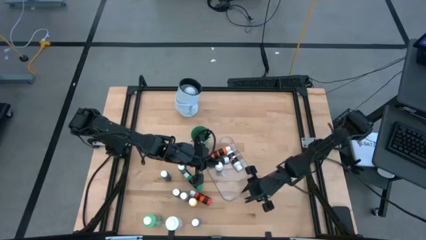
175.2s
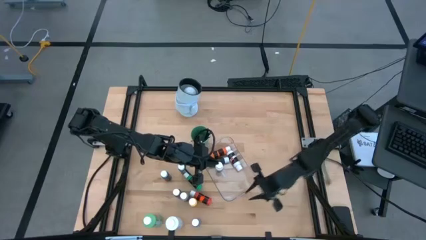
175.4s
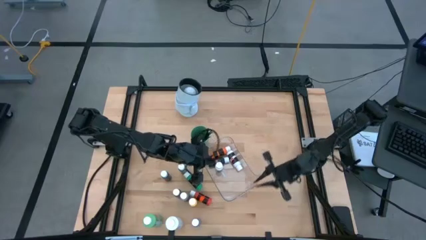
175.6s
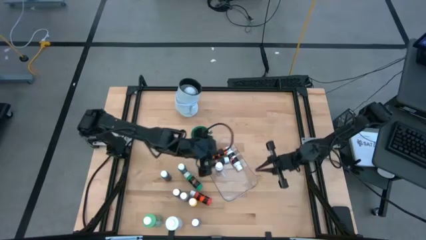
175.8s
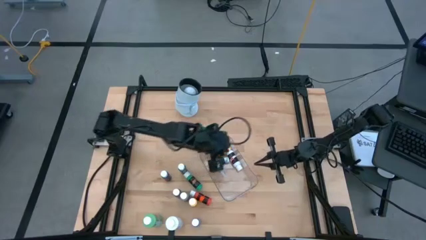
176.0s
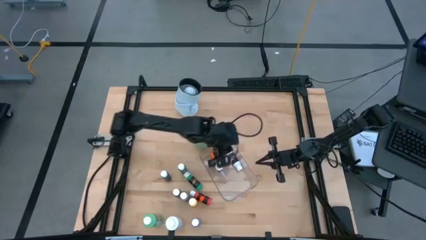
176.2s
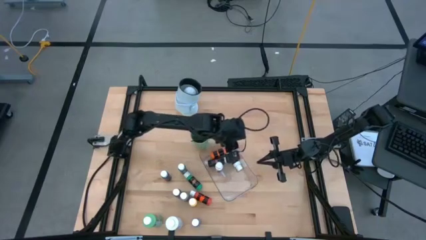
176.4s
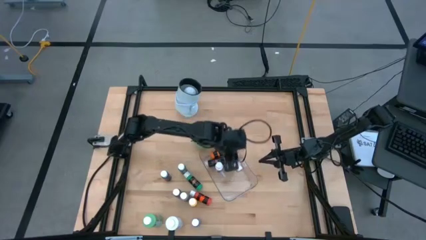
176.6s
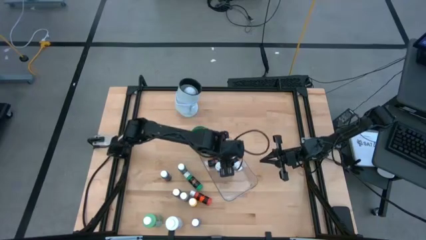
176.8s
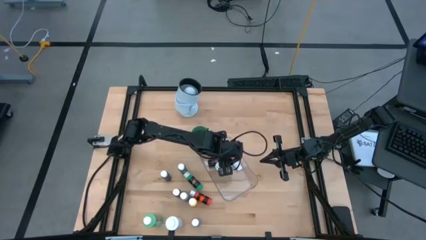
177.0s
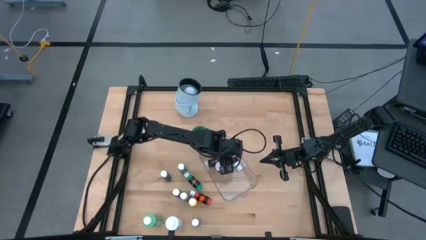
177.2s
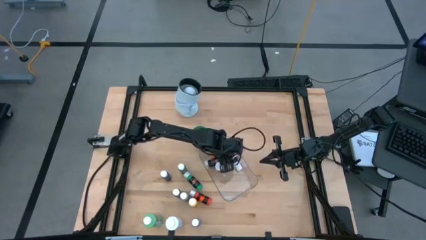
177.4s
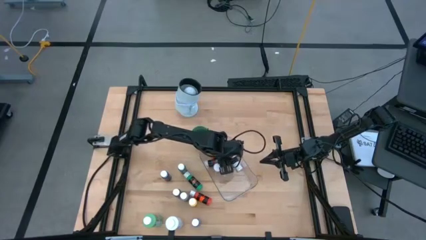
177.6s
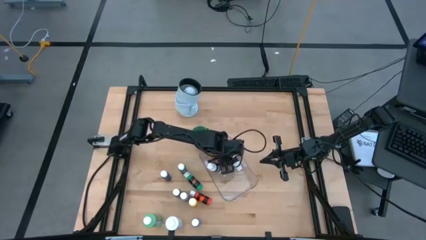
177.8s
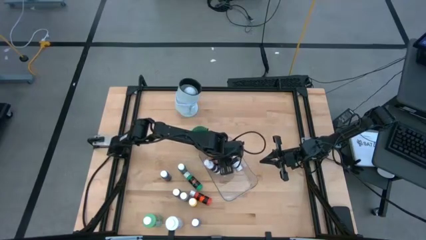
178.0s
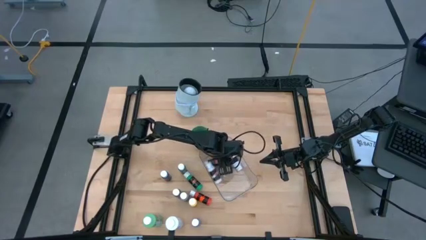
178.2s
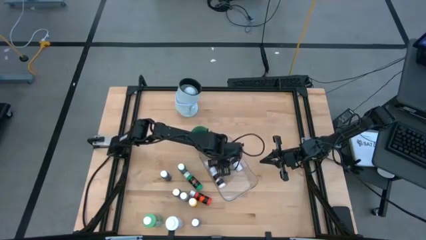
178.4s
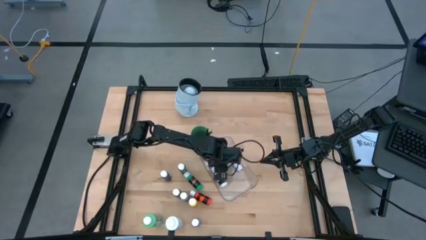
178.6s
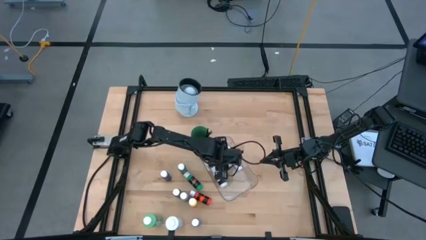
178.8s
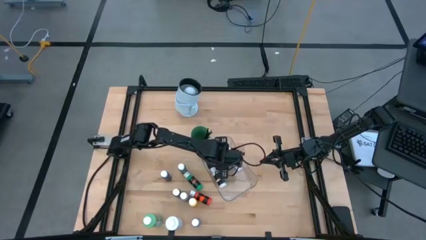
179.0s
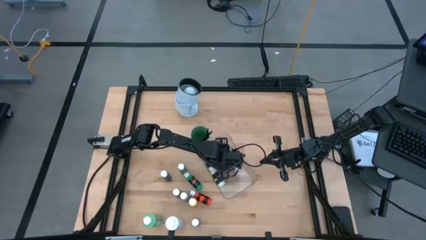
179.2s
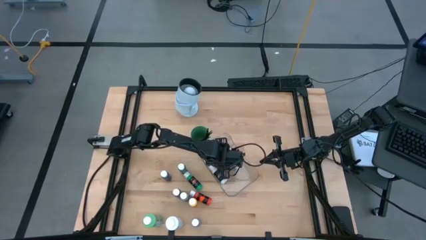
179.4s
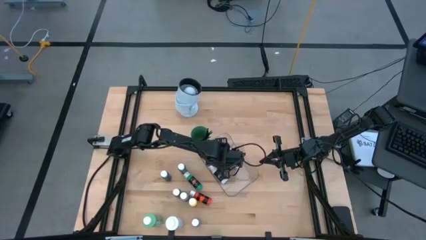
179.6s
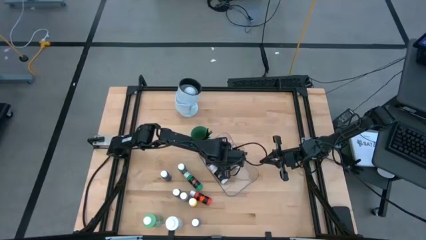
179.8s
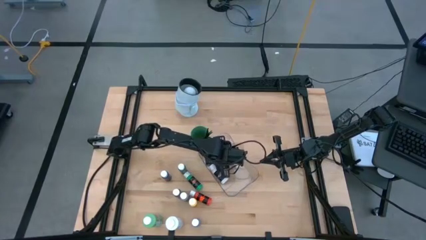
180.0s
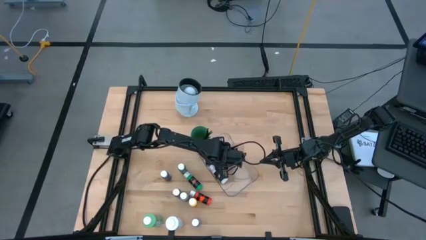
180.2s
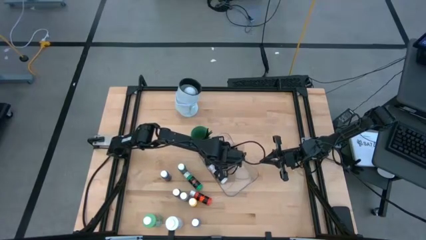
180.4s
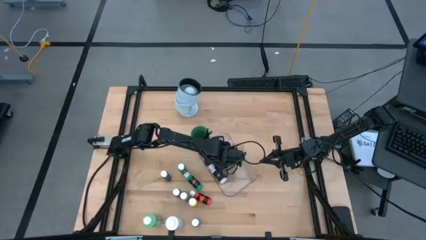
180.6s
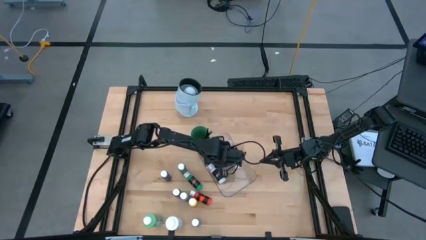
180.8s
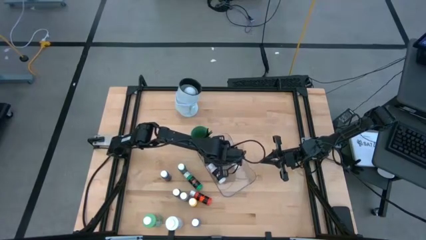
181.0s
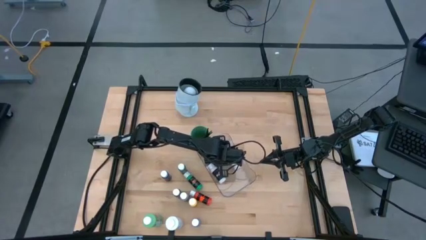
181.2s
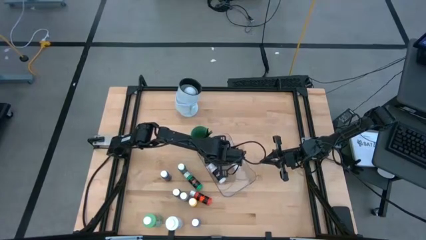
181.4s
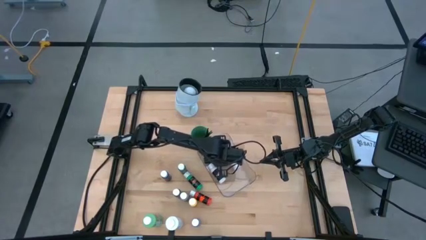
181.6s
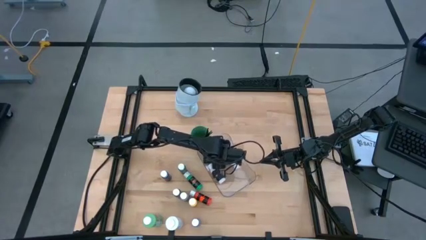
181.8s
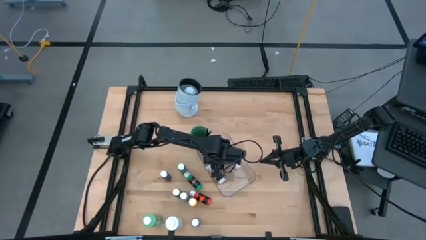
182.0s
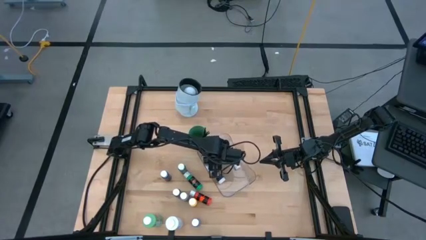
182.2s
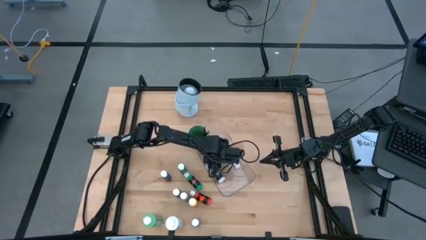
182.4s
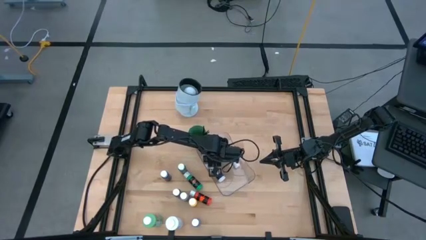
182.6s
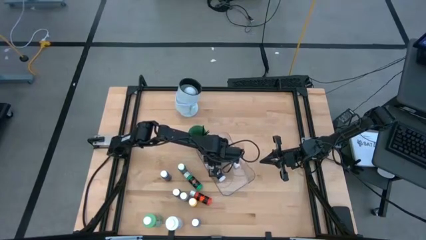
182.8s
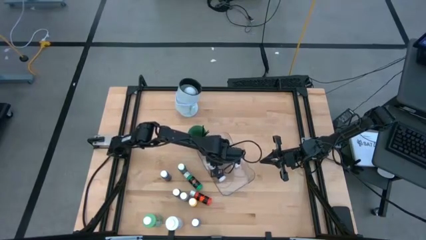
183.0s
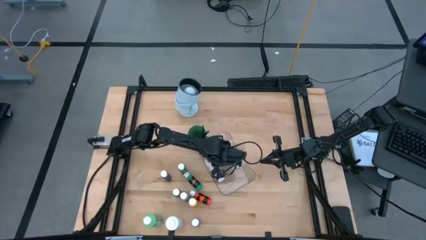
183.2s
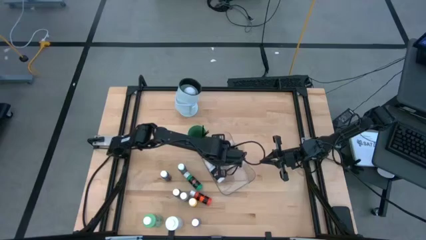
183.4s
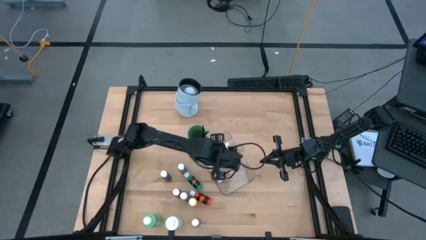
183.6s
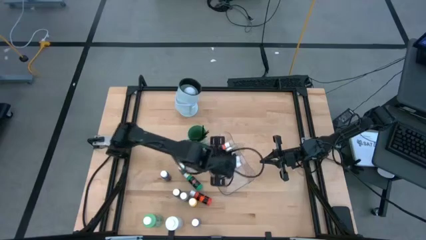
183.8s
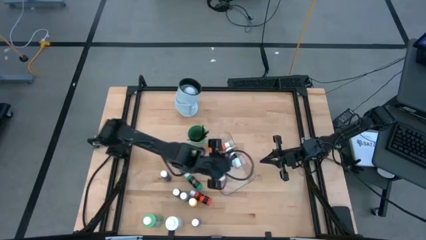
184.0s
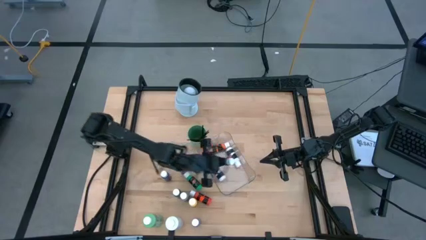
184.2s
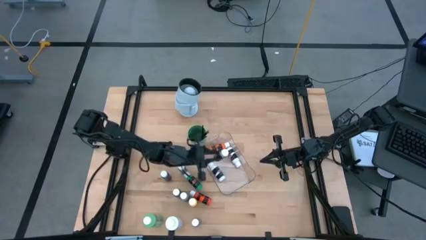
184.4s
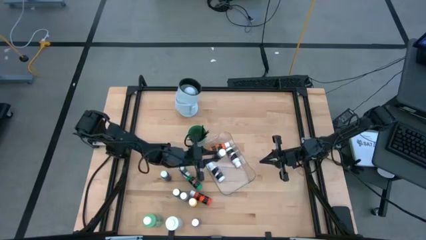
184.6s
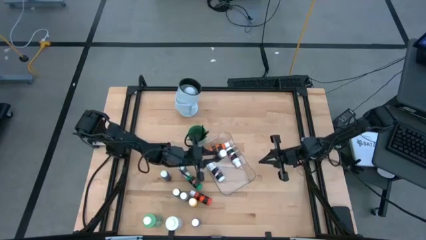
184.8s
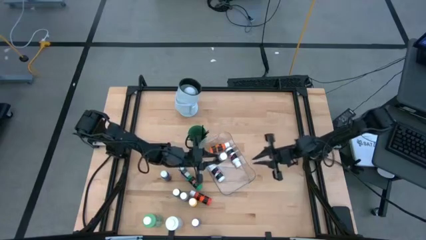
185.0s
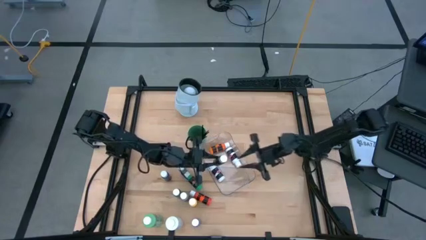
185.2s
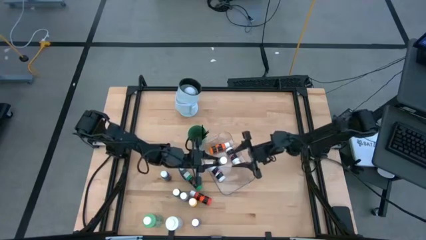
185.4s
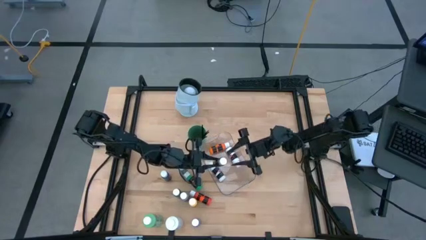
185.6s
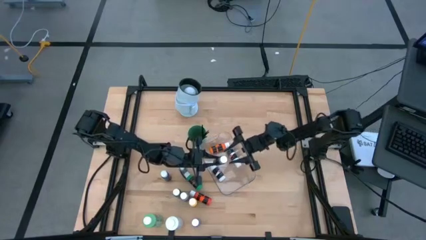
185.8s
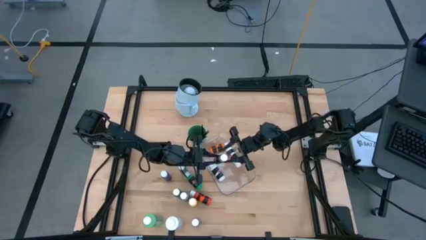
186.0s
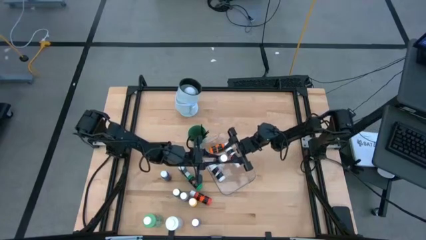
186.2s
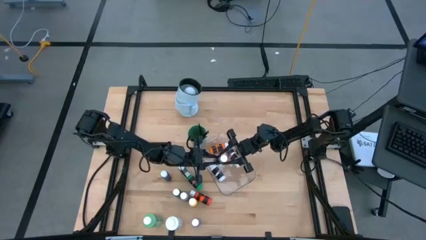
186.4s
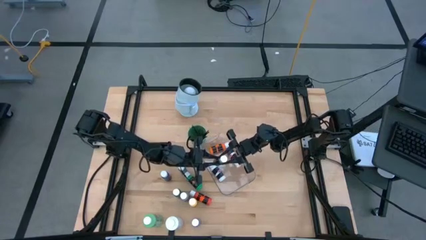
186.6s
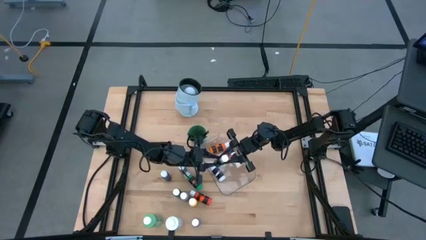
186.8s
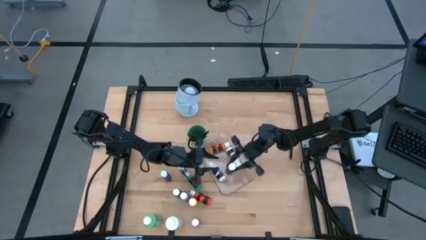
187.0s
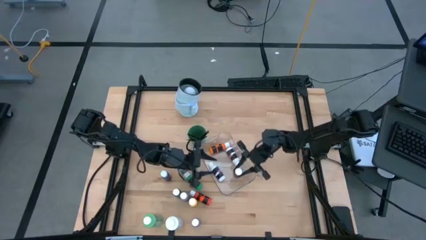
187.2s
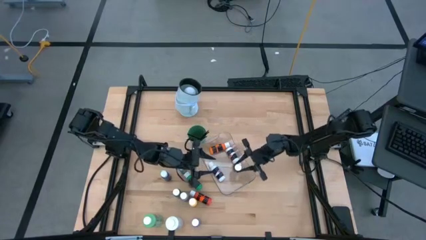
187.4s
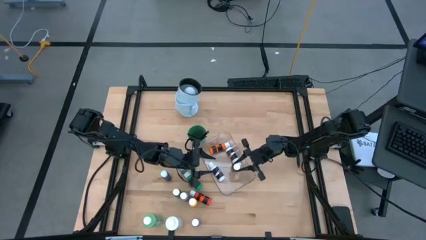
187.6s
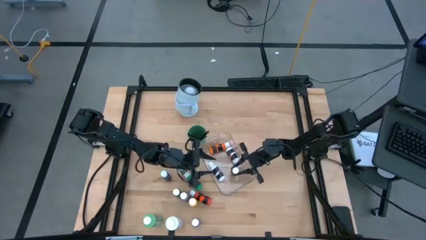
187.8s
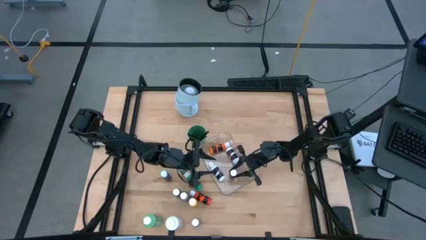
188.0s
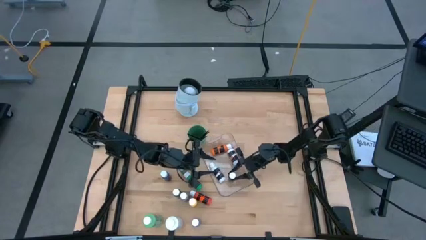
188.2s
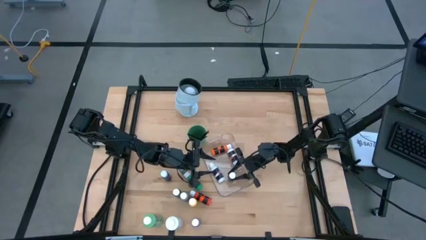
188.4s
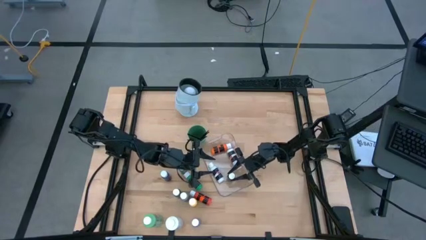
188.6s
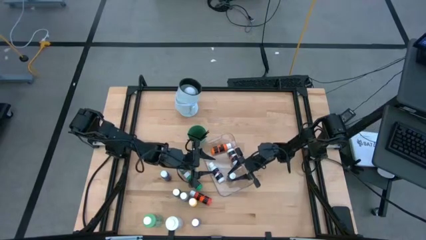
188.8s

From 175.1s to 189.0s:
Task: Pick & Place Paint Supplies
Adjust the small black paint bottle in the transparent bin

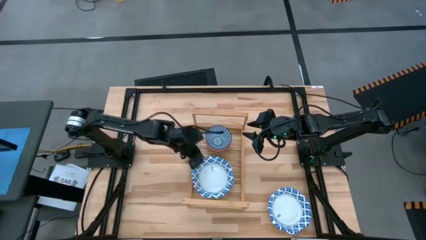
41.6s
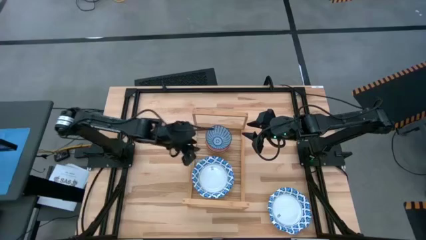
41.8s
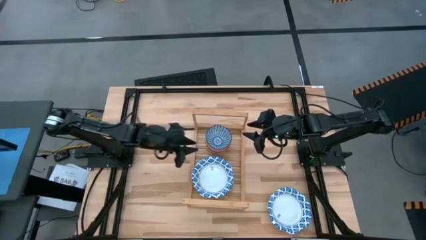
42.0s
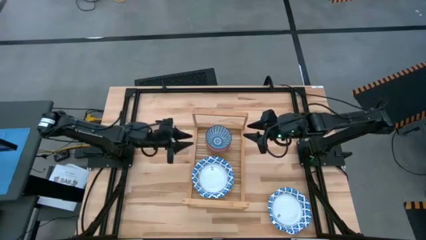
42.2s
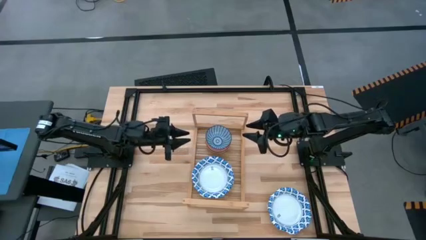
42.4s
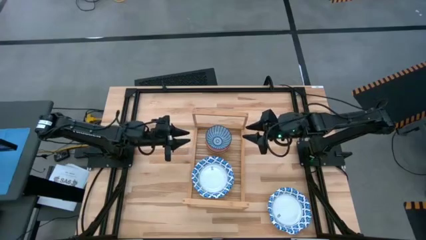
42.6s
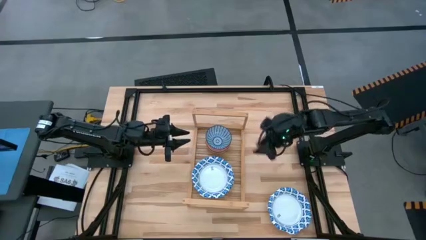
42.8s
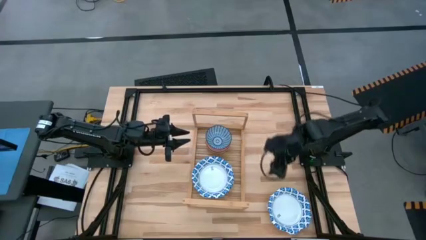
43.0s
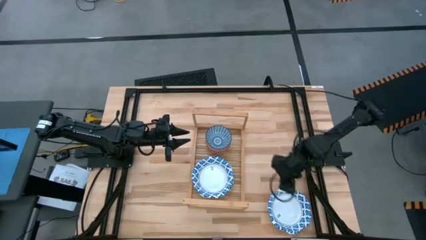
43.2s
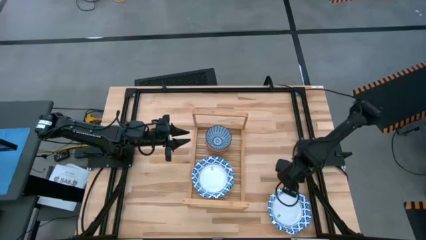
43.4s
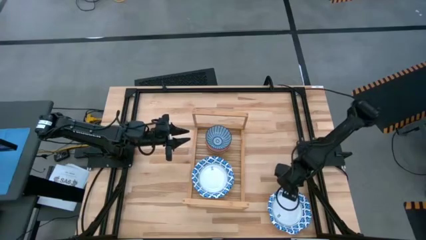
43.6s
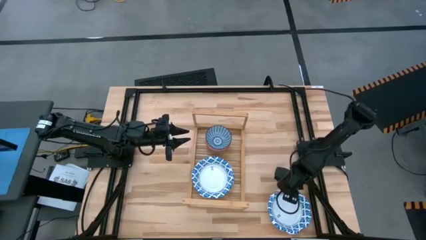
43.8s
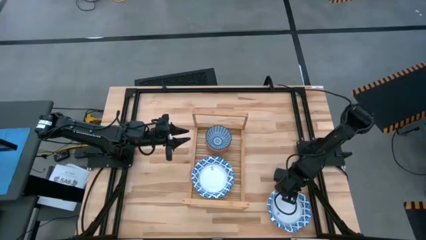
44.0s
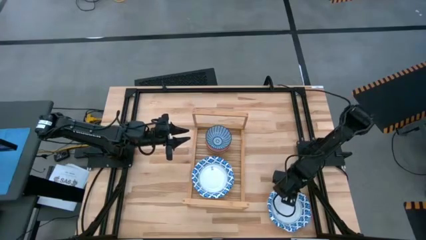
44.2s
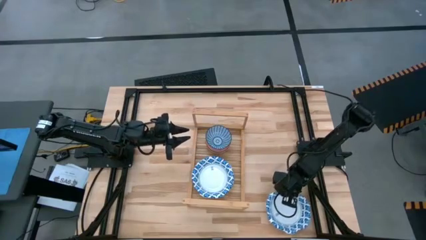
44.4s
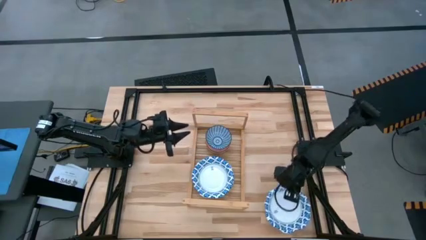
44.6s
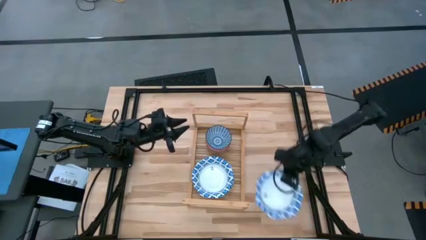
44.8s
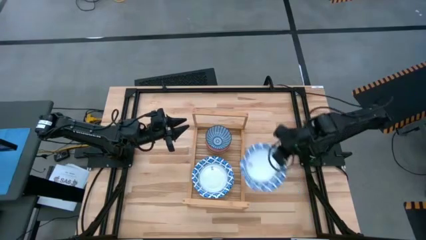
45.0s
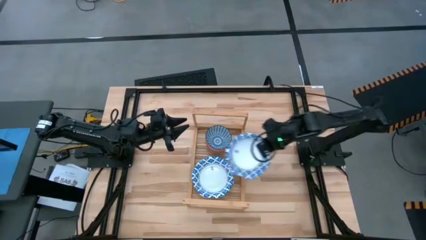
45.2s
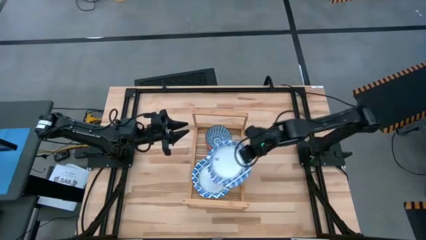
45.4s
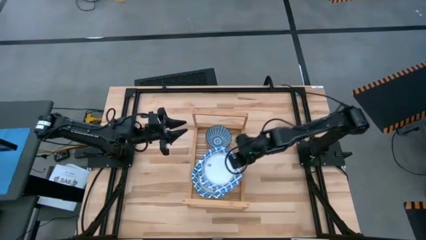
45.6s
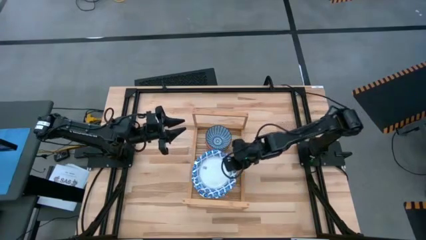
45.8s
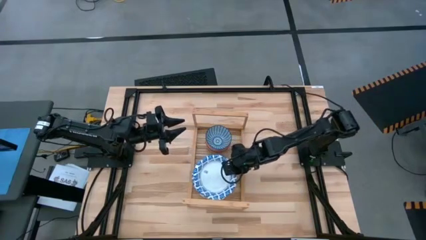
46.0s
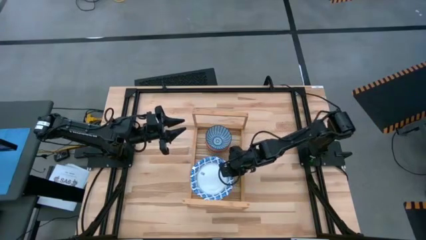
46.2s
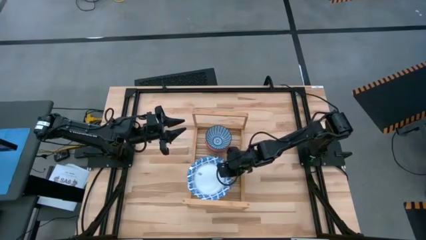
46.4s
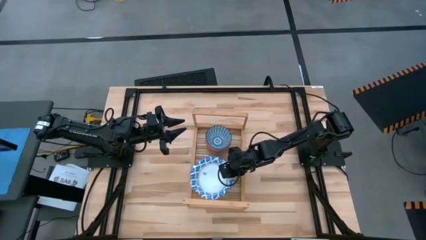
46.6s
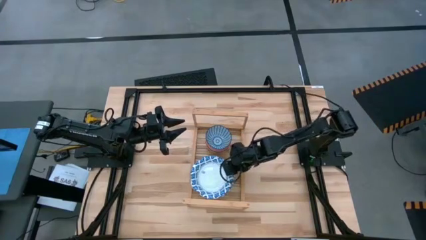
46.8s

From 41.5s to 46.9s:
Task: Place and stack bowls onto a shelf
Stack the blue patterned bowl on the blue patterned bowl on the shelf
